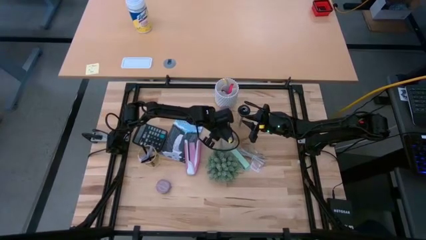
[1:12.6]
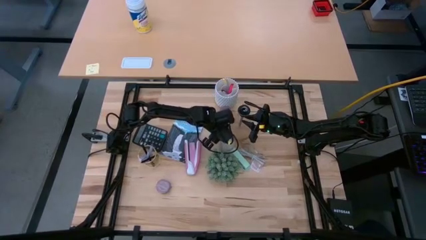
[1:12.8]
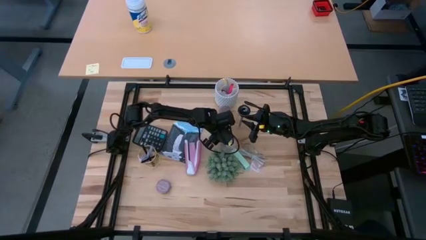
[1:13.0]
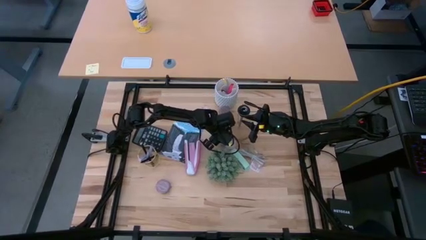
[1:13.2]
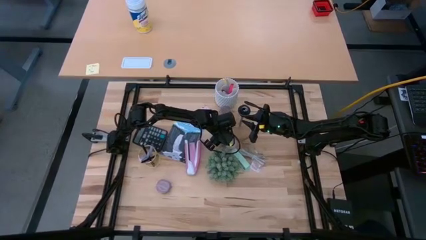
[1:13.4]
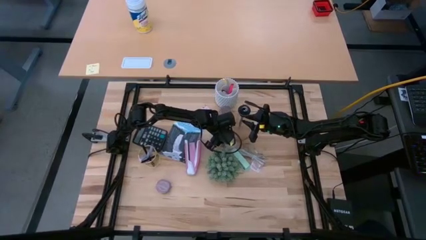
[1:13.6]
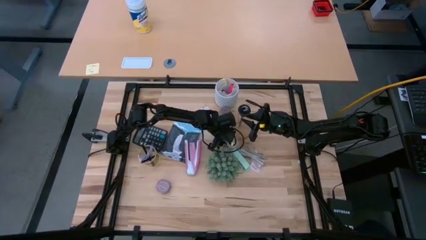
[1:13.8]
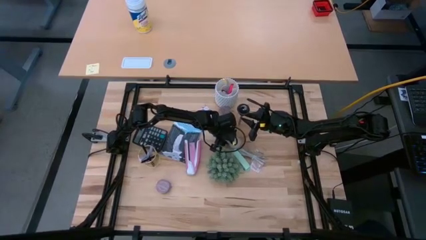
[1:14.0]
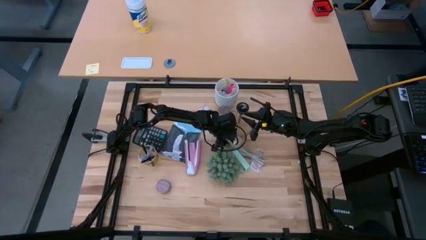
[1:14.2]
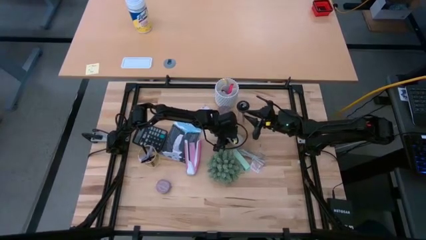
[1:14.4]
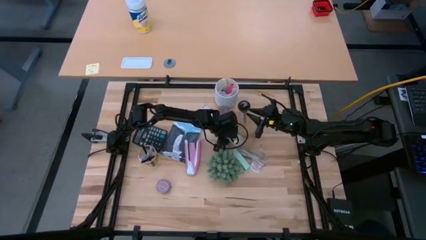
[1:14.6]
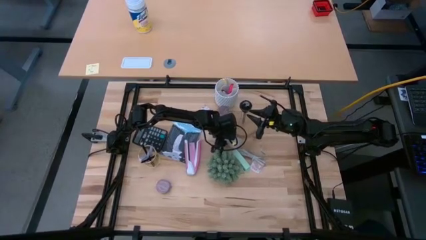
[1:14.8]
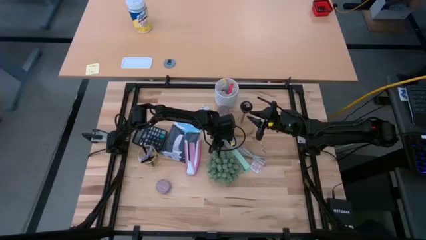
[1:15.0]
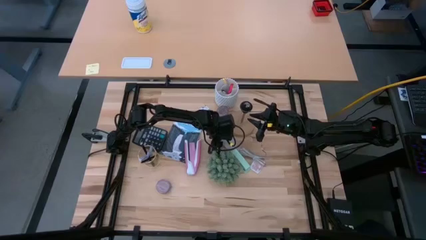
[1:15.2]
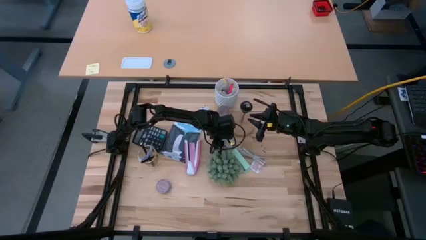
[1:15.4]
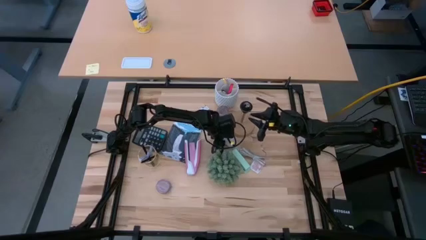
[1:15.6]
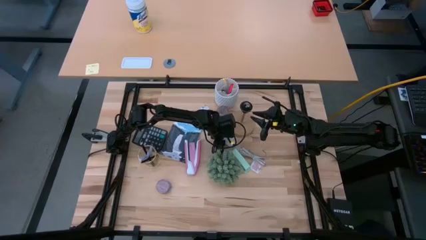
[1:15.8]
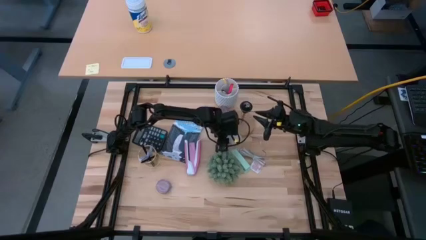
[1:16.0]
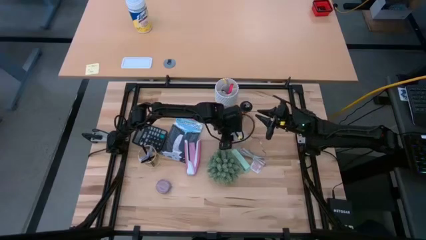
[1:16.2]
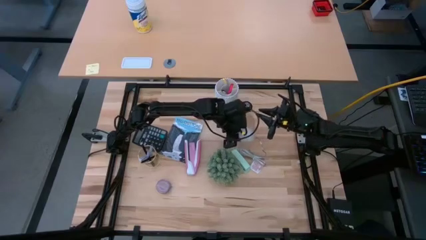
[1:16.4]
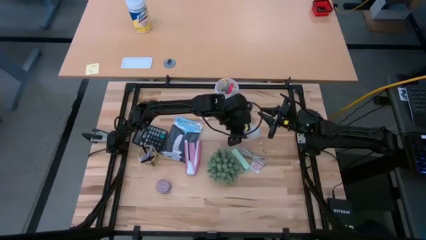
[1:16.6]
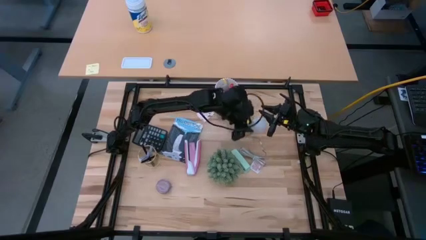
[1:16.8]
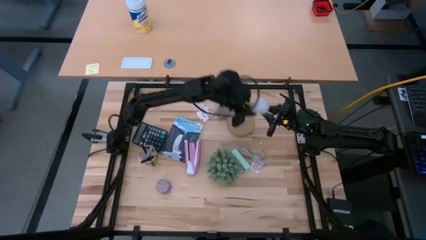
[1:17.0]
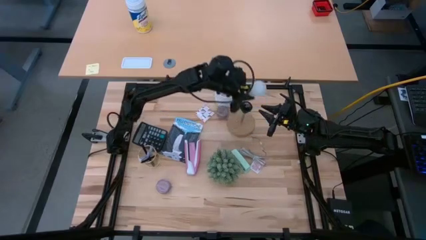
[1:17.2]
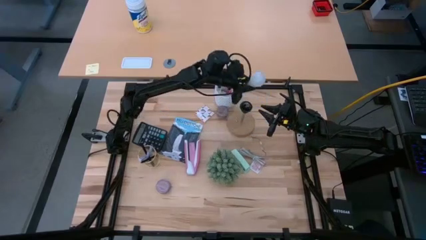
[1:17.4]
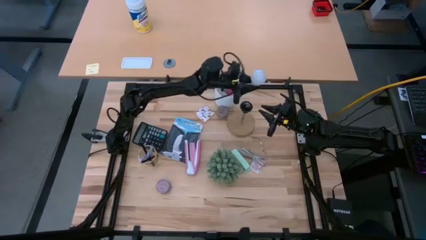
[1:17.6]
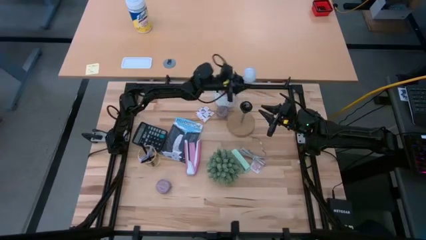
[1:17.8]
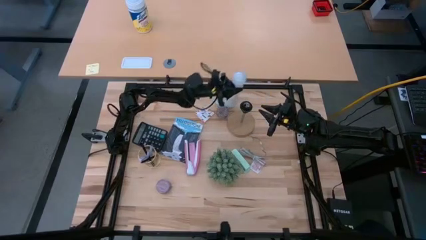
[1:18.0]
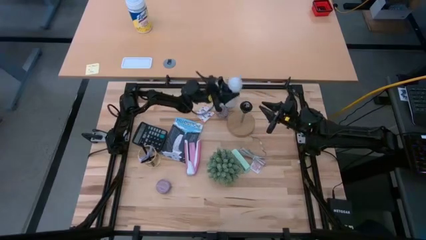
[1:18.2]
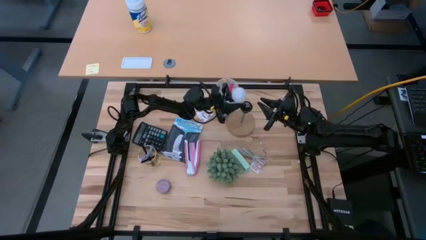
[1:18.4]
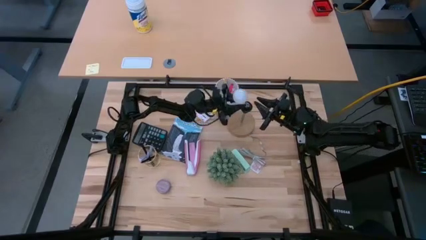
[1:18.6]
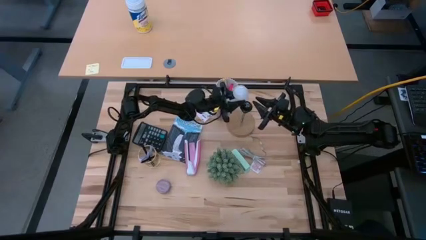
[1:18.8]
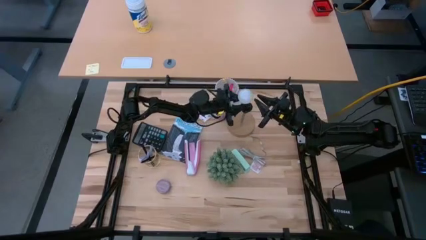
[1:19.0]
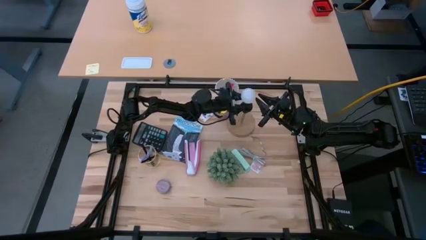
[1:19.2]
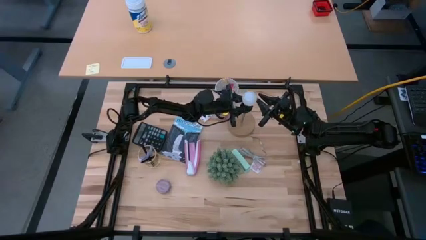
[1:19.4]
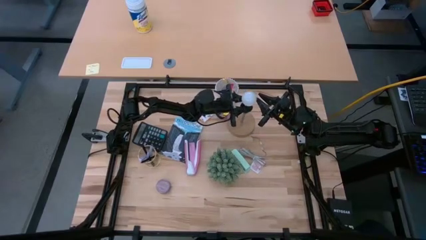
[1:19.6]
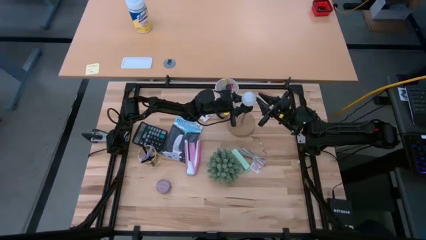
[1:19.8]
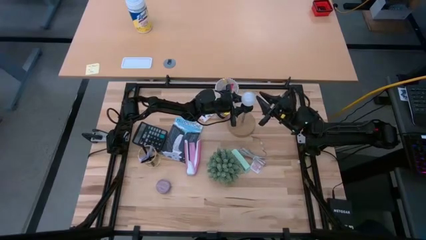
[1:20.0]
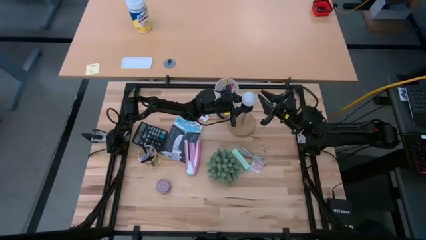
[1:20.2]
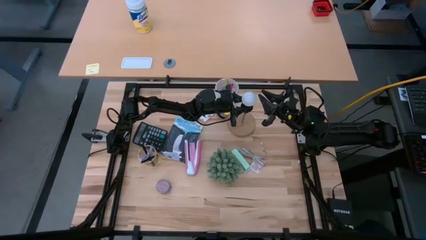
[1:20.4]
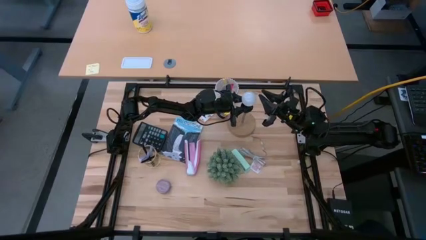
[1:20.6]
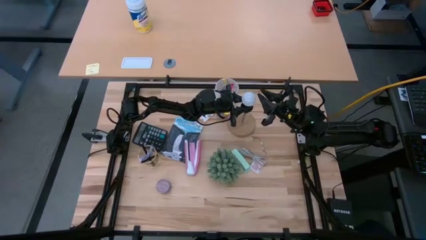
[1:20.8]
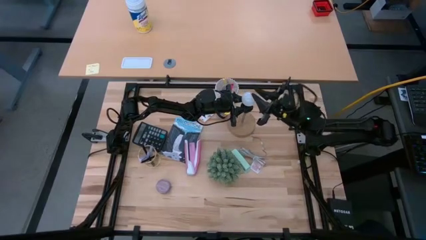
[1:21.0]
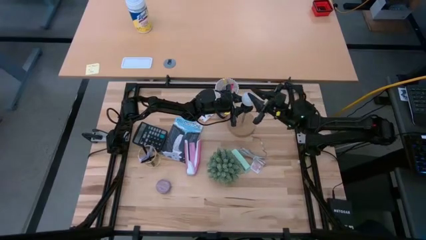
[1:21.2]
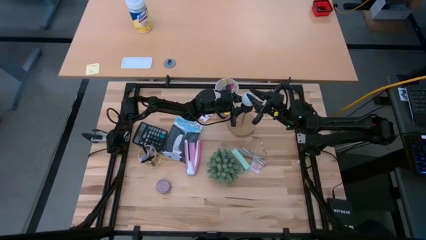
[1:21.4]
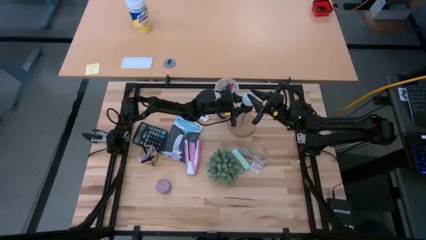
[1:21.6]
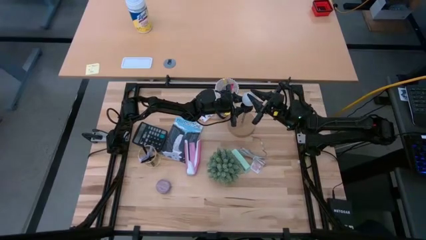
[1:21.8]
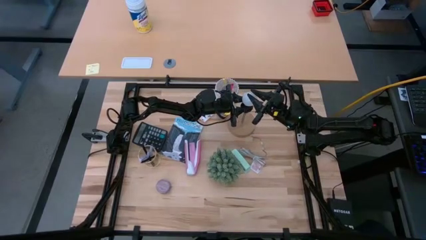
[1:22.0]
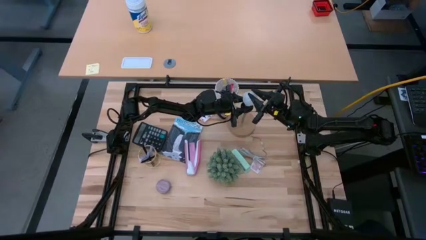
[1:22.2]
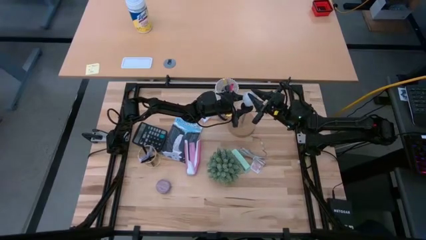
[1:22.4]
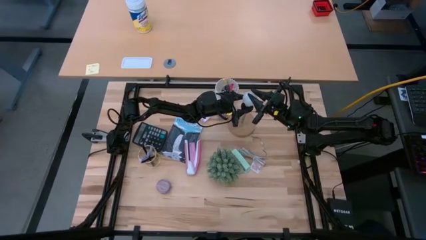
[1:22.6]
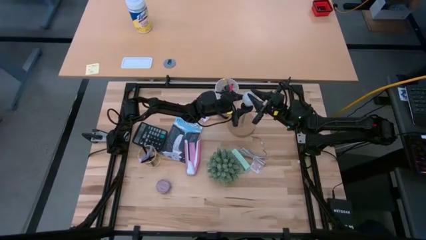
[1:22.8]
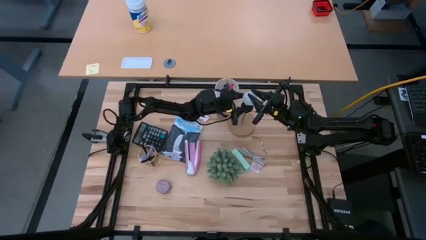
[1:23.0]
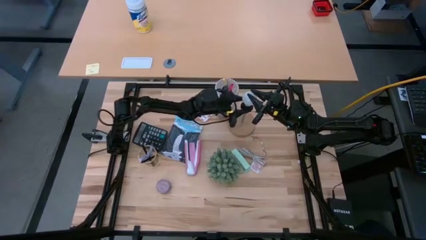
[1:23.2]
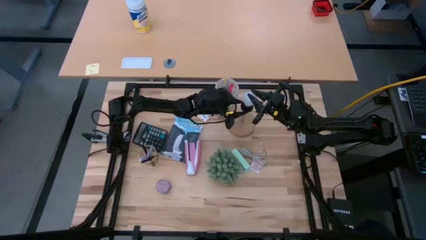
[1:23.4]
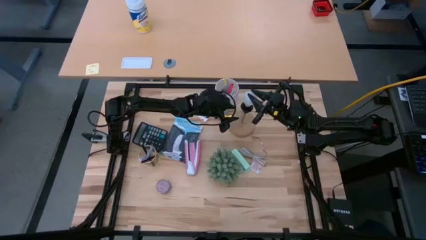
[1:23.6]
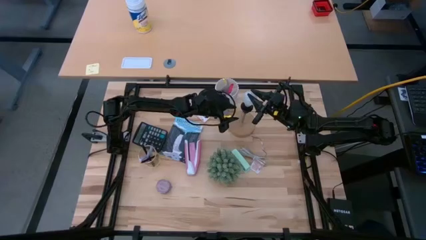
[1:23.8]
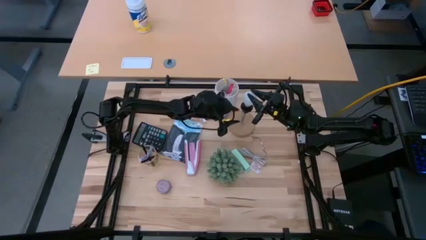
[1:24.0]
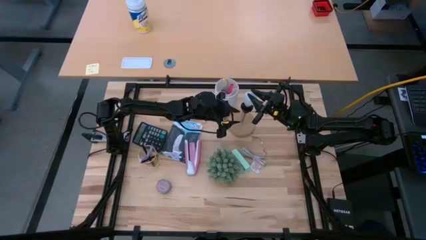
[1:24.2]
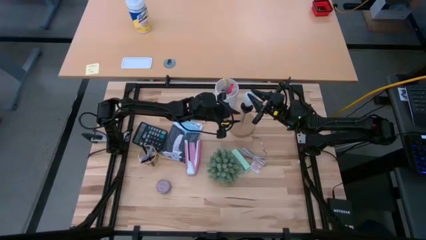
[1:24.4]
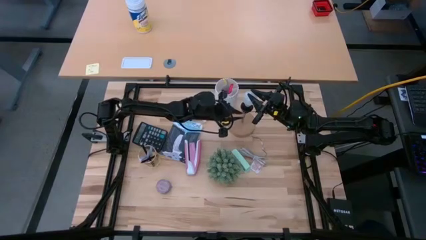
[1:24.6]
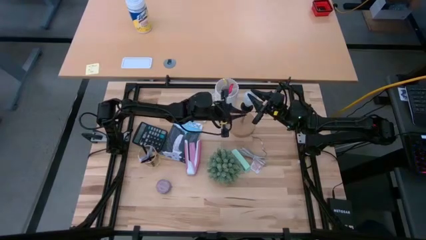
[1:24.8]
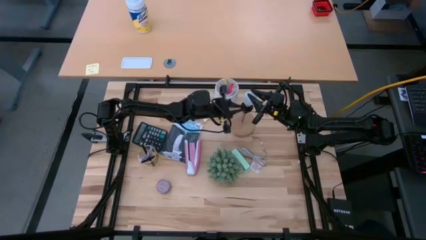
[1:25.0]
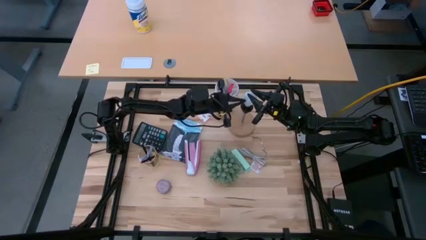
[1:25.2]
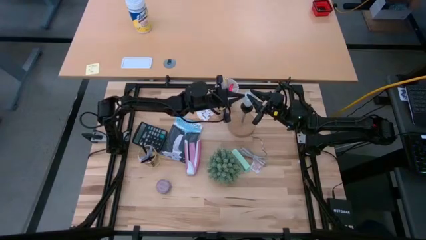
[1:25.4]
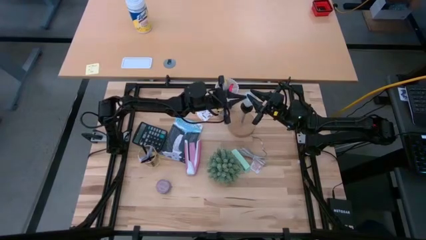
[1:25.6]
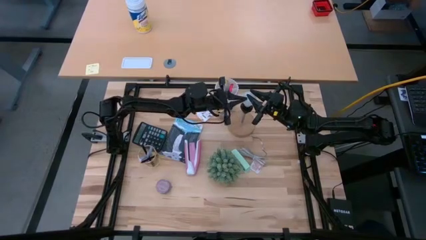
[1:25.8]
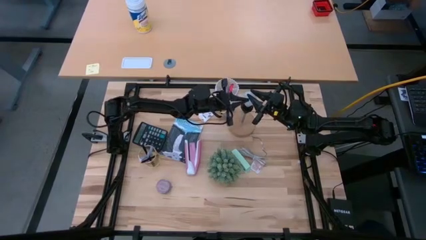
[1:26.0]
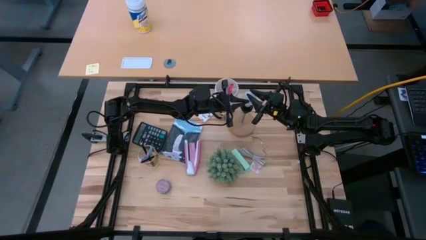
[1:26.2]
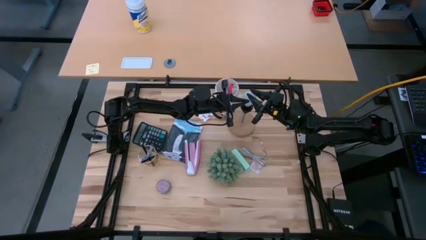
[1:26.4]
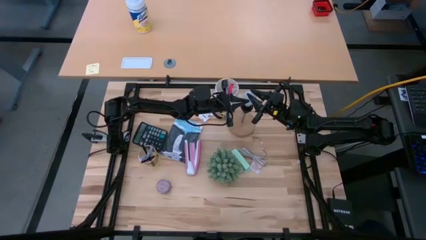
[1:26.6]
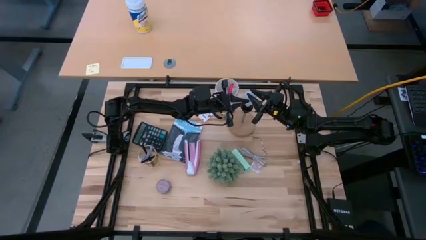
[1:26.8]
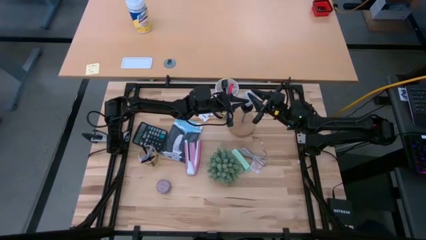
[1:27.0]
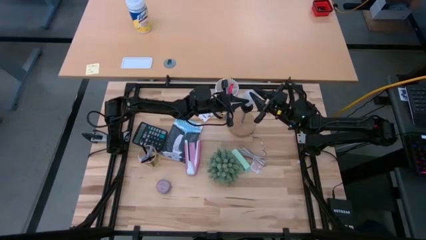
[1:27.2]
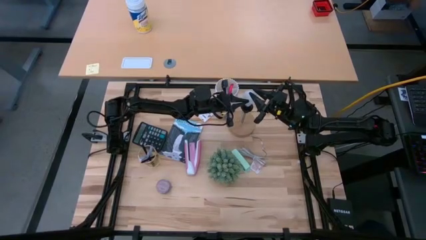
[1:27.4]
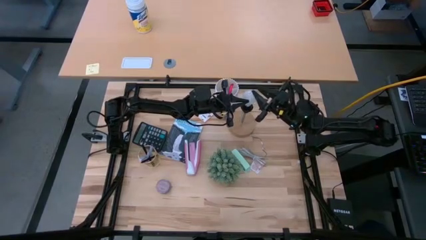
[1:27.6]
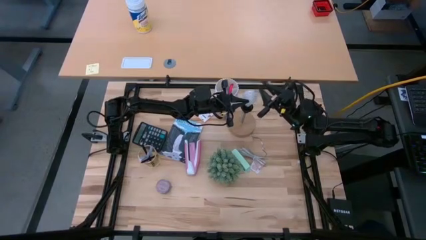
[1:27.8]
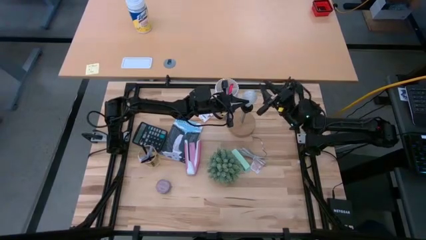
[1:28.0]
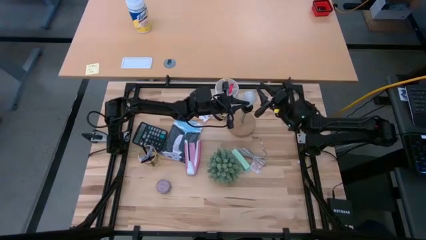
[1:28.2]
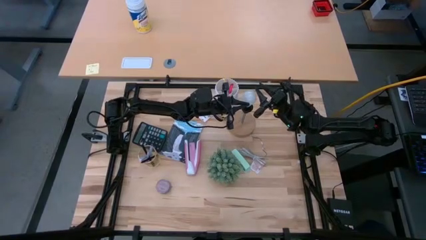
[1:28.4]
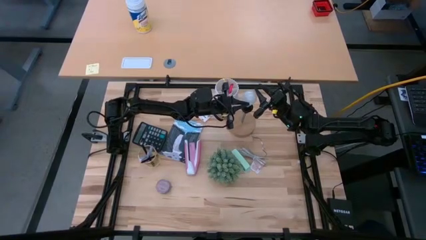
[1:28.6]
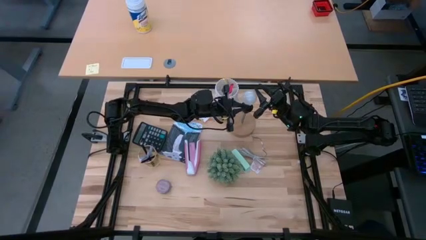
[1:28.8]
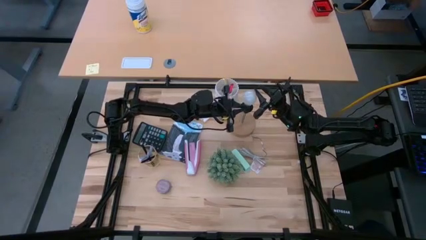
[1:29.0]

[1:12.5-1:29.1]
Task: Screw lightbulb
Insert the lightbulb into the lamp
